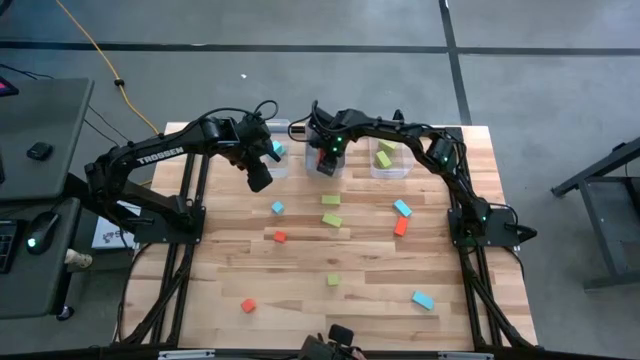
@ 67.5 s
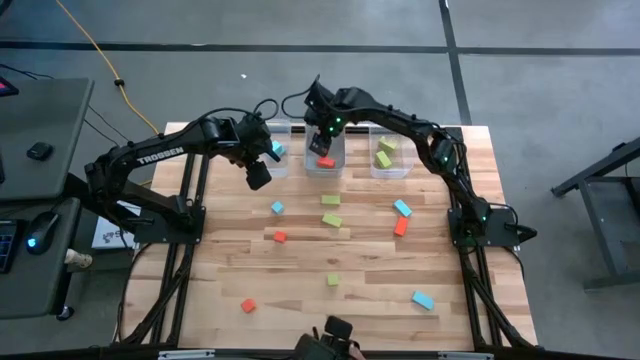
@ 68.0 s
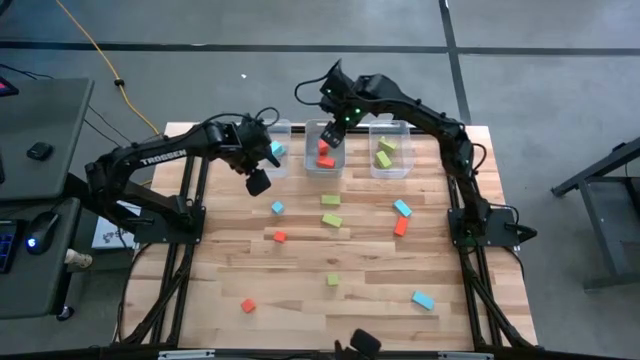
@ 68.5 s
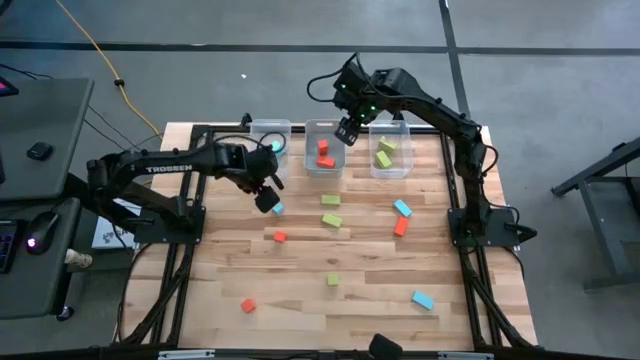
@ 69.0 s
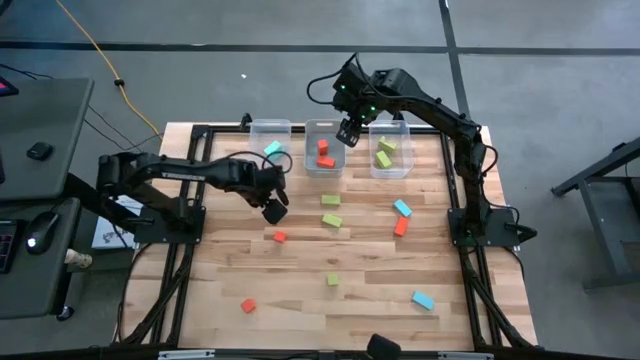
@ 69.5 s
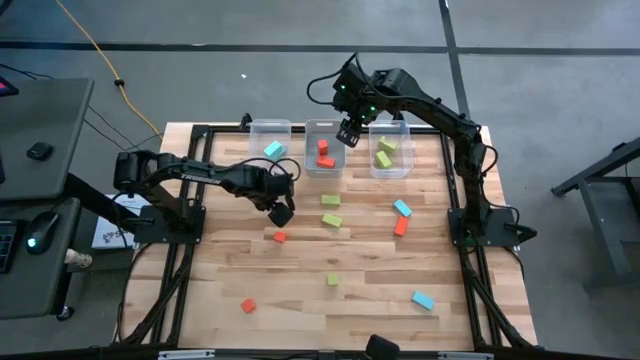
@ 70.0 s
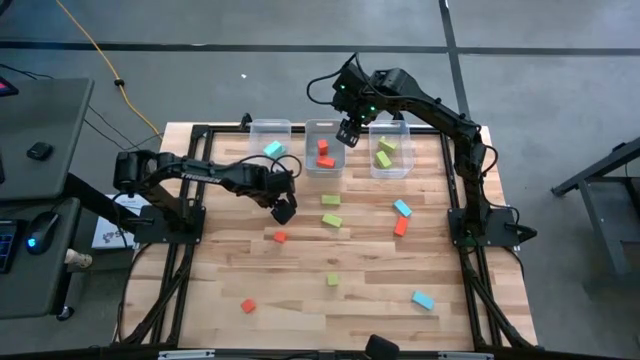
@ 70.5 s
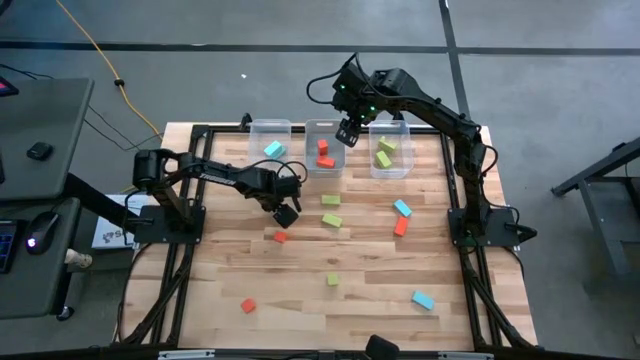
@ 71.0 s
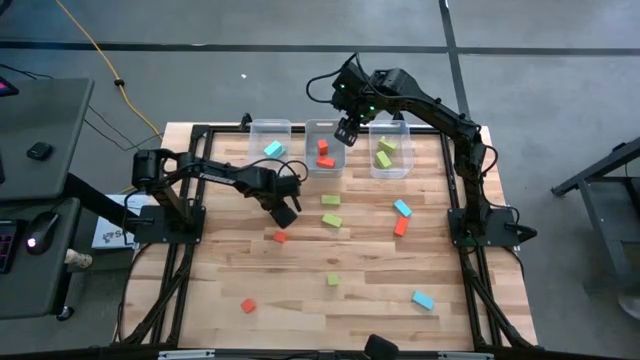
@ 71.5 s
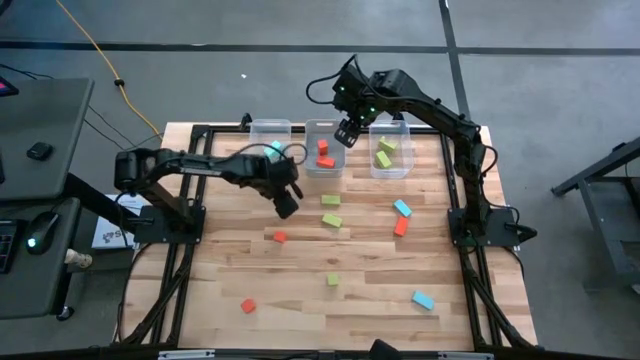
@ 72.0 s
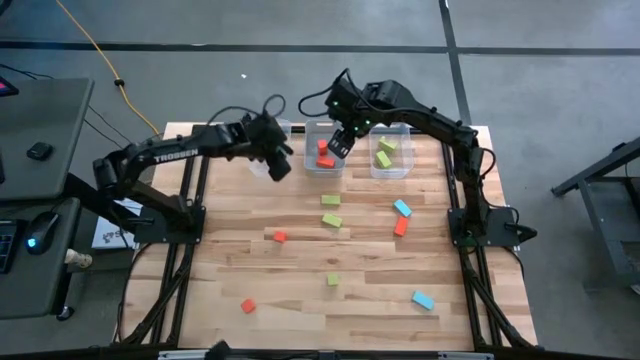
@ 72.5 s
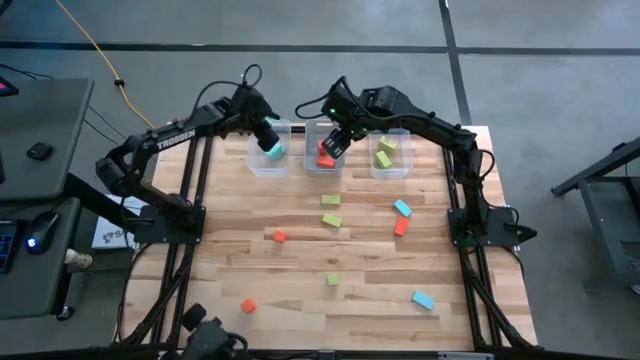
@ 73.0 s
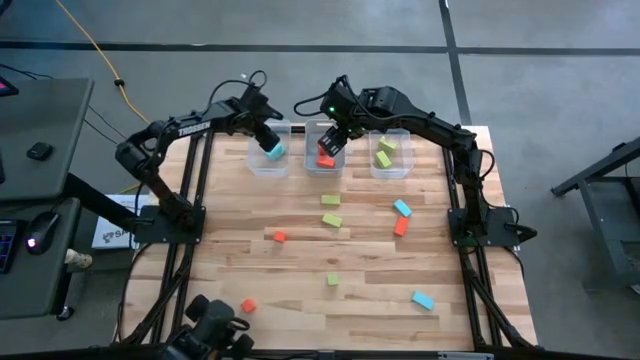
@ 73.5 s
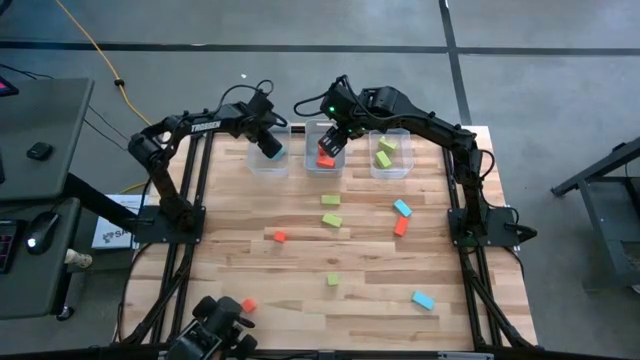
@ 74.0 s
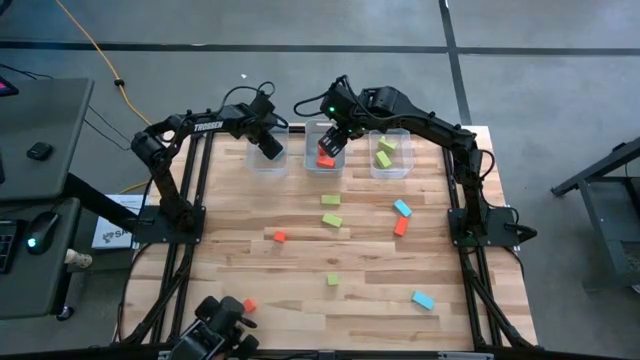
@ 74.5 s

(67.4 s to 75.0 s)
Task: Sort & place blocks by color
Put the blue cube block into the left transparent bin

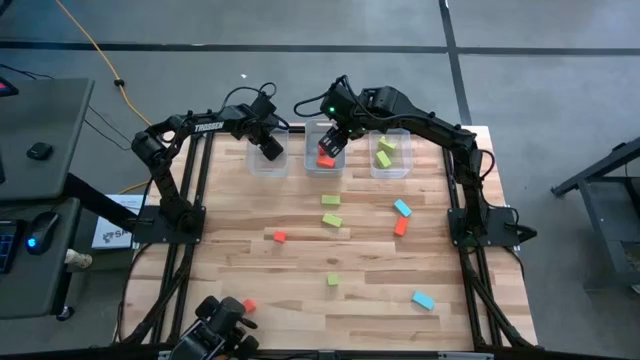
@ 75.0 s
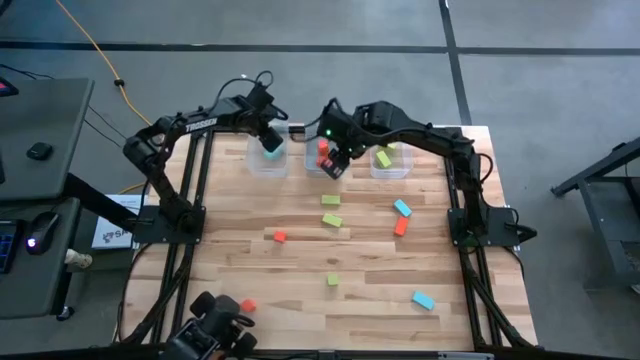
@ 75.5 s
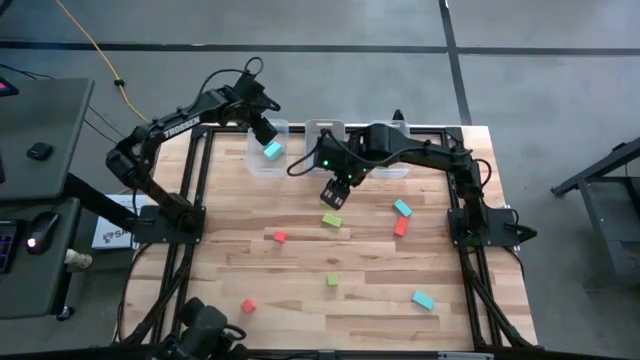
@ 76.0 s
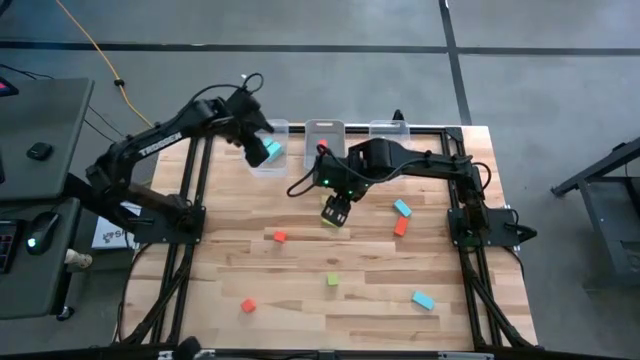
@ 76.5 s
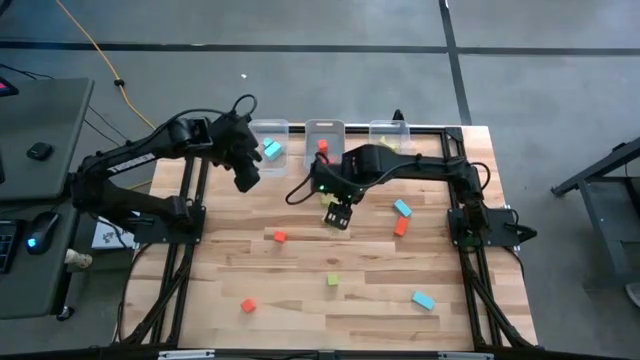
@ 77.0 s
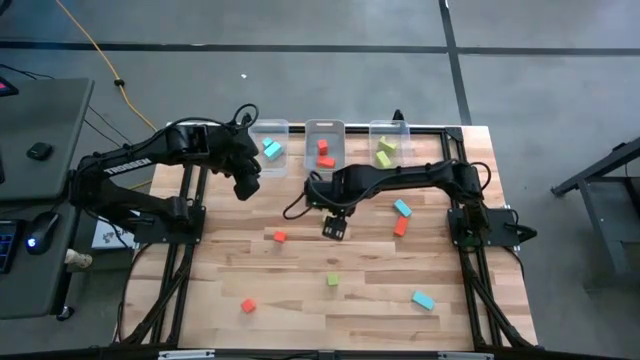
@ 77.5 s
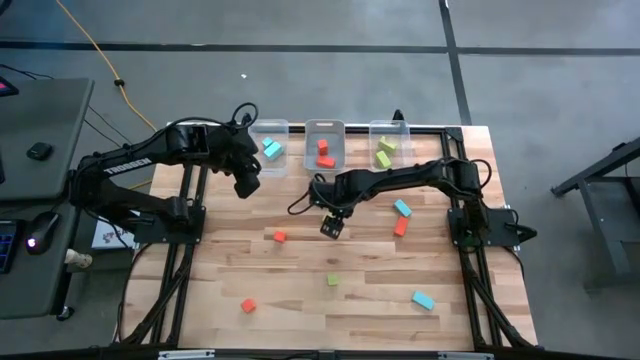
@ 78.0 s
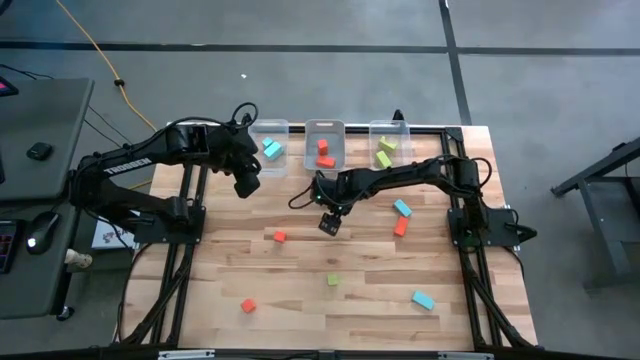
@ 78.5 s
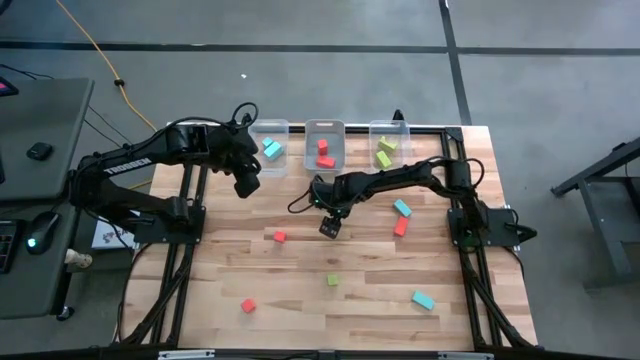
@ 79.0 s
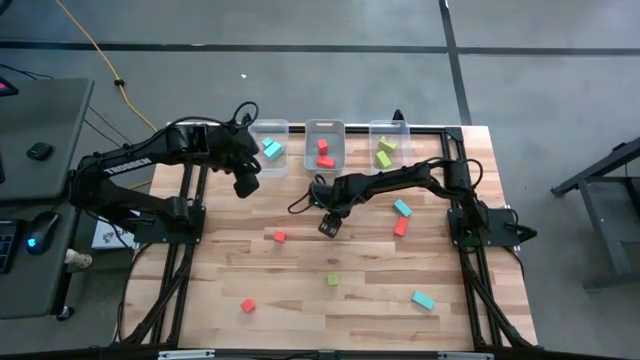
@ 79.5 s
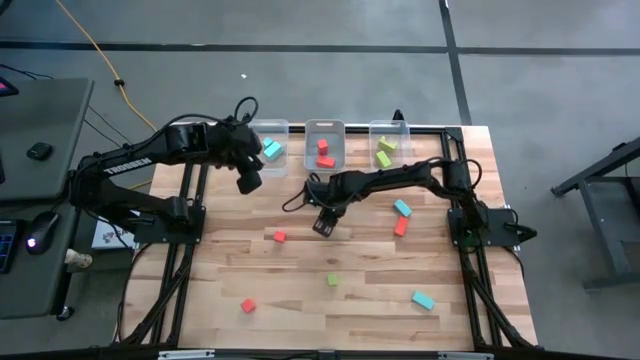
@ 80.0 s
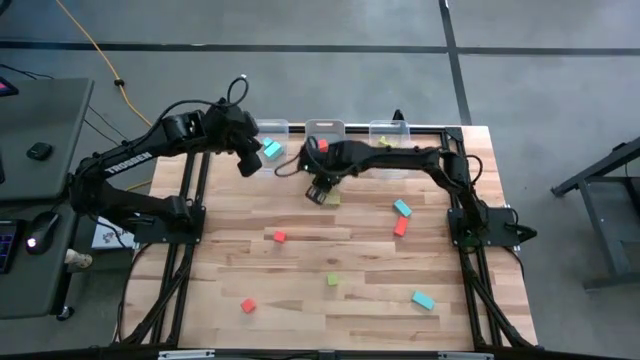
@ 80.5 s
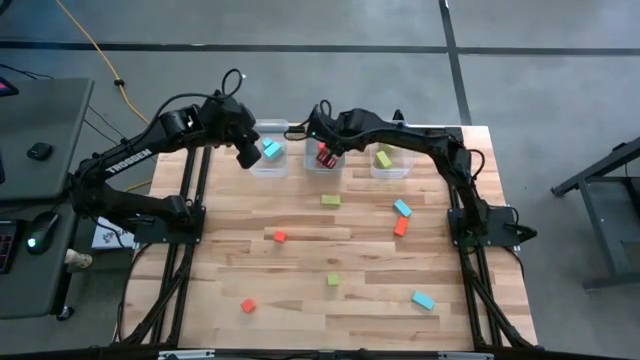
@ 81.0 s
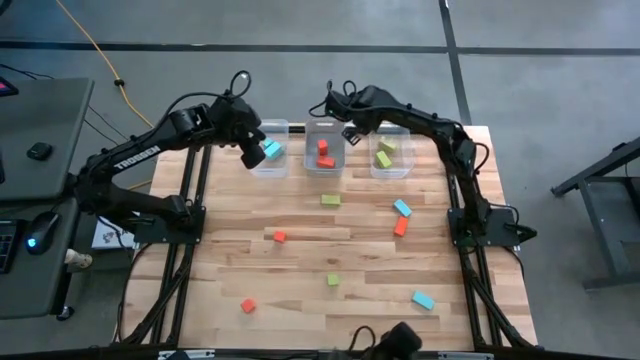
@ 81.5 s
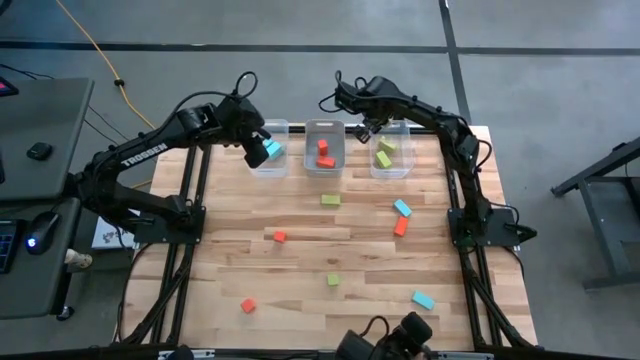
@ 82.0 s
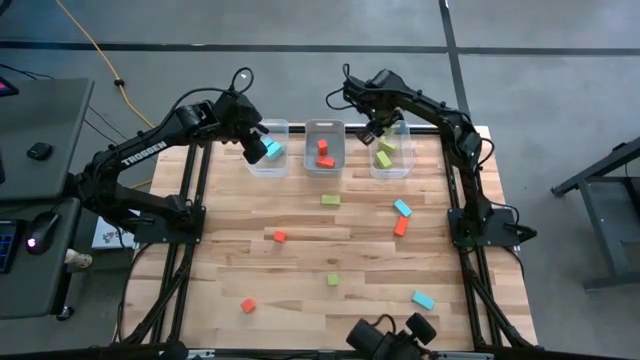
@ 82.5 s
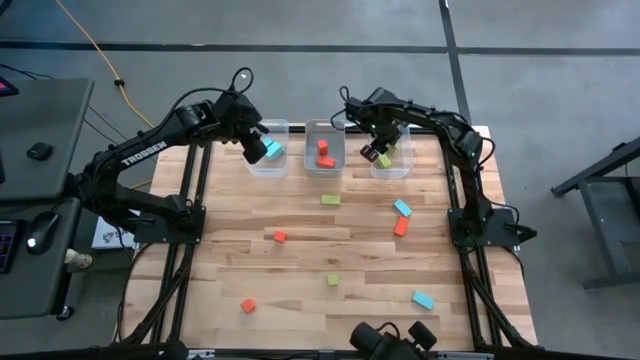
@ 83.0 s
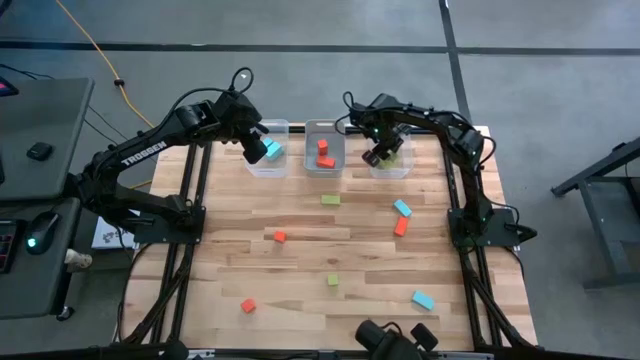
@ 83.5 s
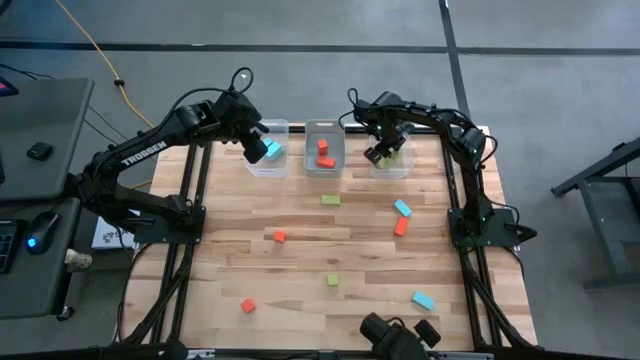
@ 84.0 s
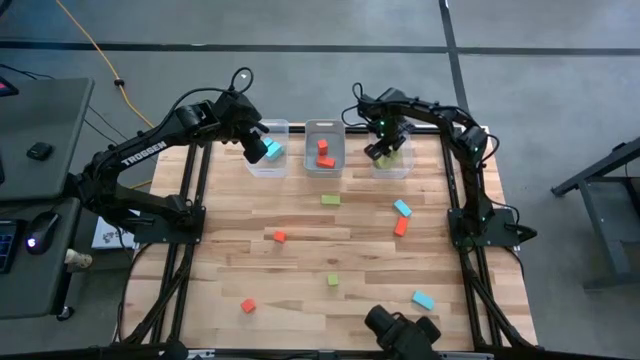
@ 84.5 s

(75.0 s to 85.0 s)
Put the small rectangular block into the right transparent bin

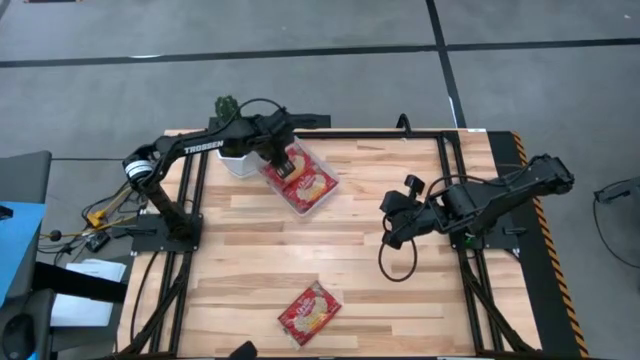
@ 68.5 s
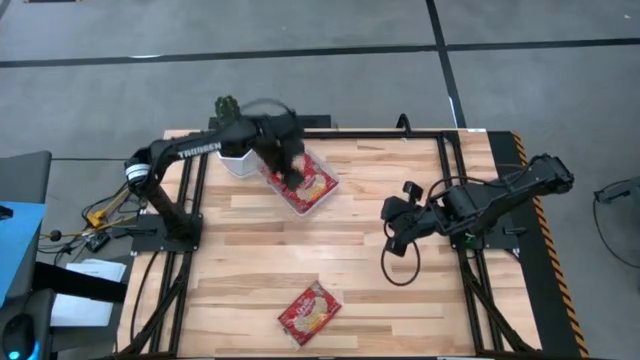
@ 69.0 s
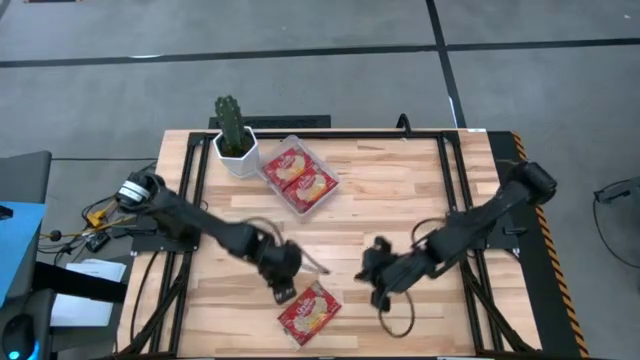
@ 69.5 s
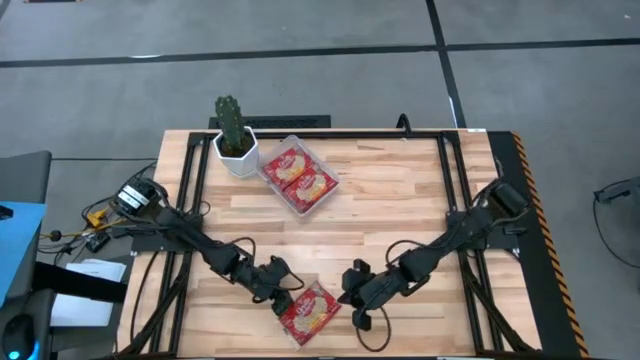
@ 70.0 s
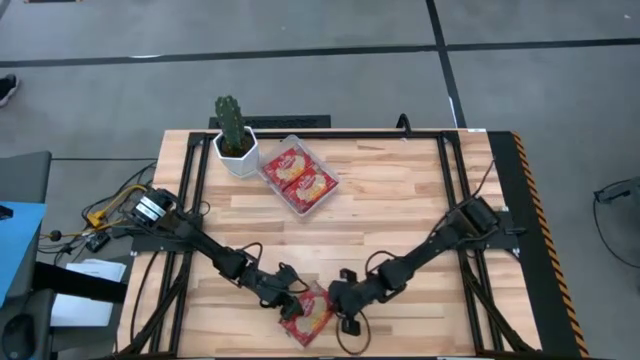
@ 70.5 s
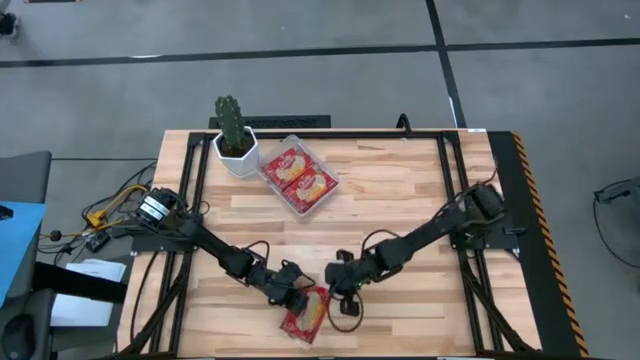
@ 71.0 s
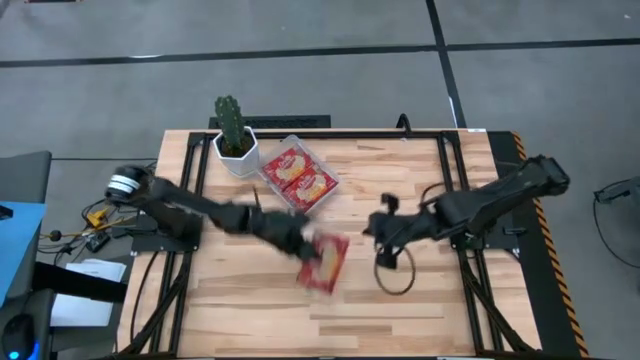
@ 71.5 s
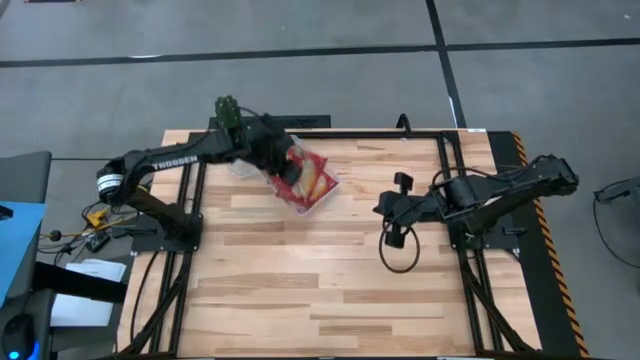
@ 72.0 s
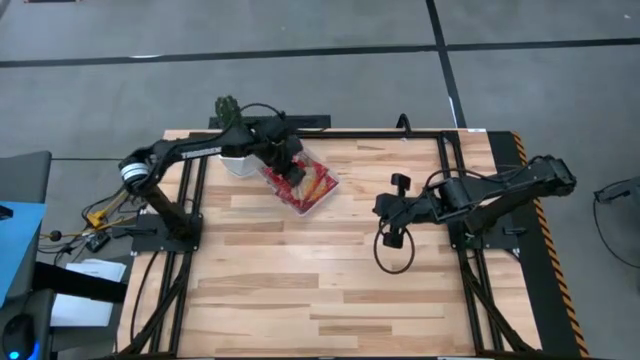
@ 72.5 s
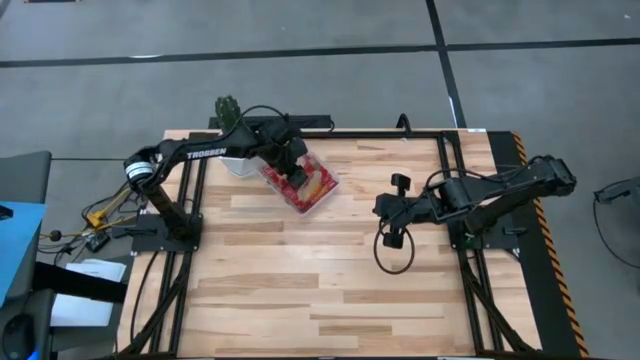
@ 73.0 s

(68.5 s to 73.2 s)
Task: Sort popcorn bags into baskets
Put the red popcorn bag into the transparent bin
